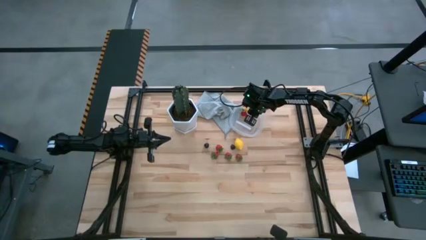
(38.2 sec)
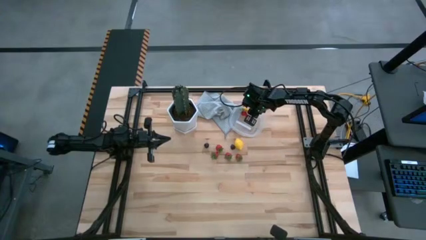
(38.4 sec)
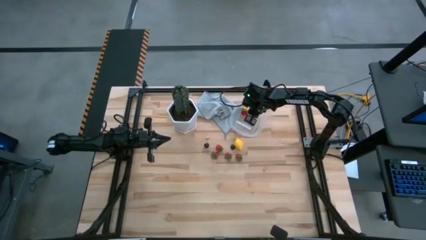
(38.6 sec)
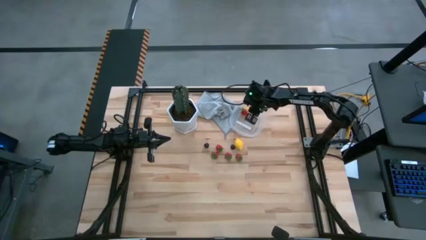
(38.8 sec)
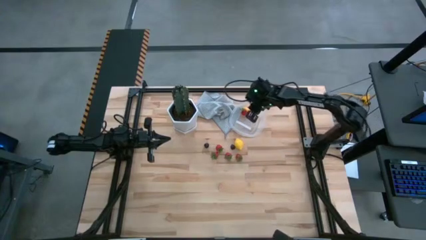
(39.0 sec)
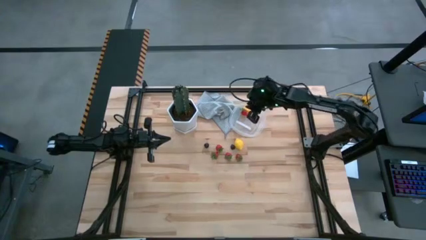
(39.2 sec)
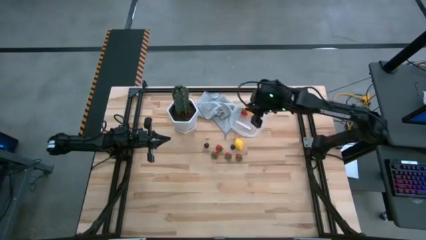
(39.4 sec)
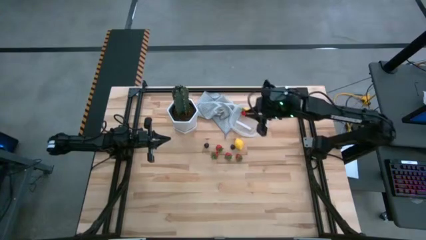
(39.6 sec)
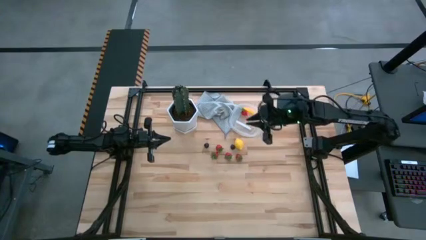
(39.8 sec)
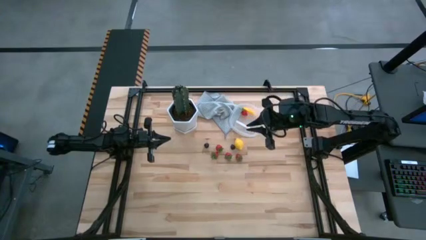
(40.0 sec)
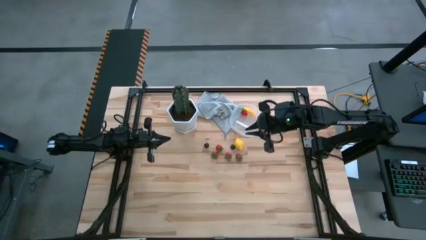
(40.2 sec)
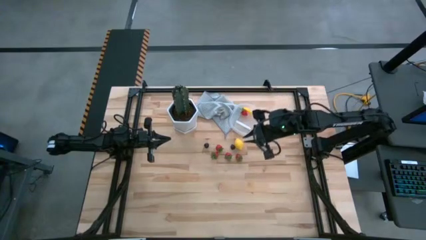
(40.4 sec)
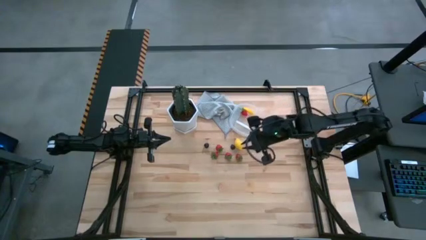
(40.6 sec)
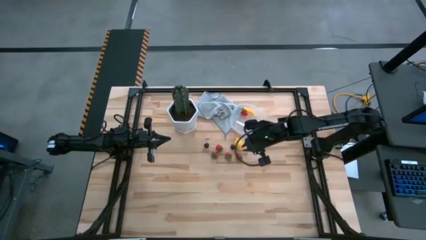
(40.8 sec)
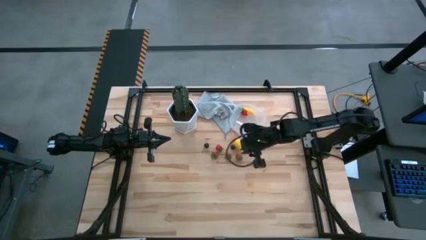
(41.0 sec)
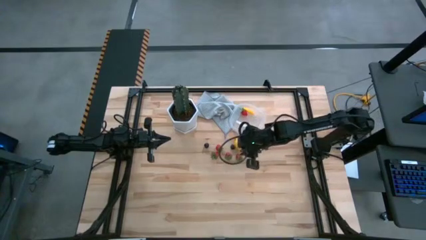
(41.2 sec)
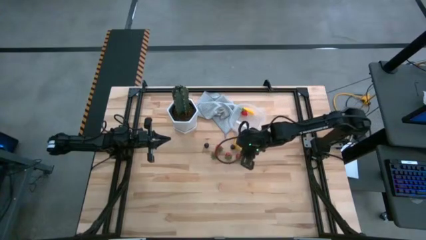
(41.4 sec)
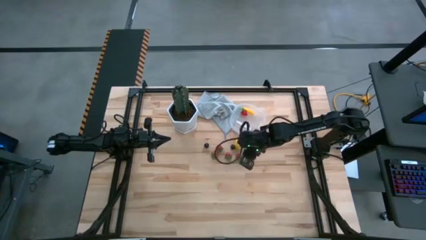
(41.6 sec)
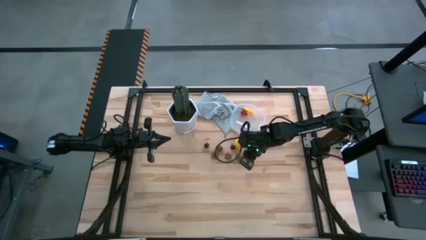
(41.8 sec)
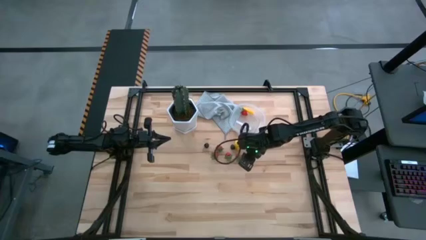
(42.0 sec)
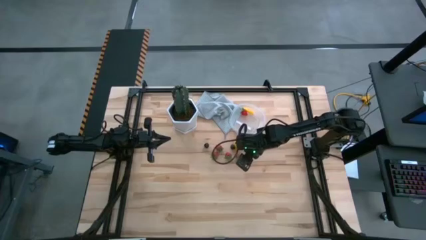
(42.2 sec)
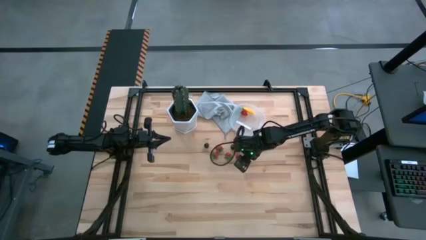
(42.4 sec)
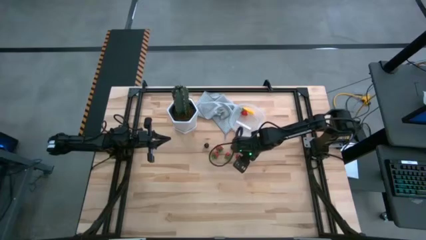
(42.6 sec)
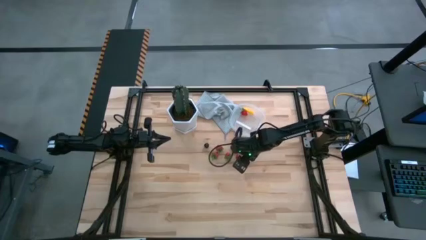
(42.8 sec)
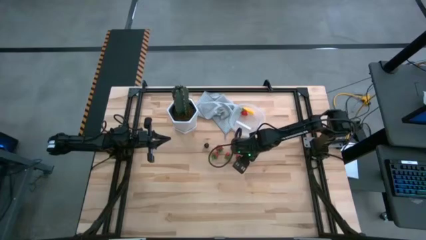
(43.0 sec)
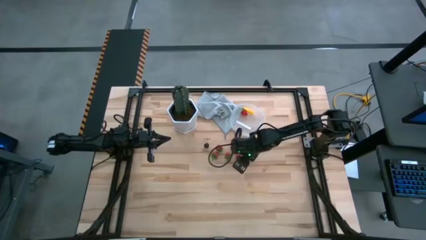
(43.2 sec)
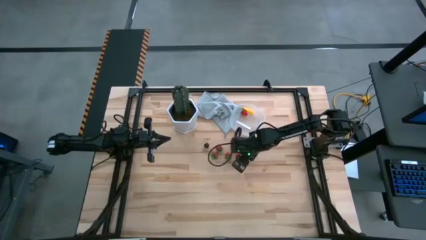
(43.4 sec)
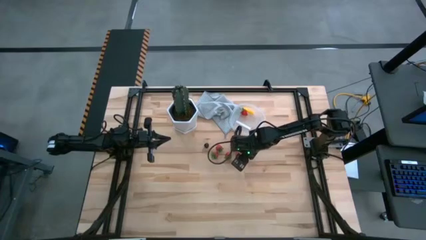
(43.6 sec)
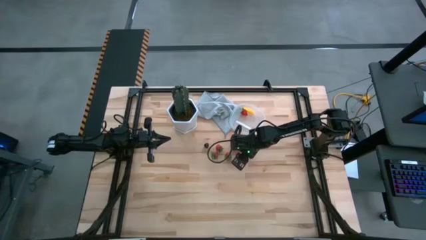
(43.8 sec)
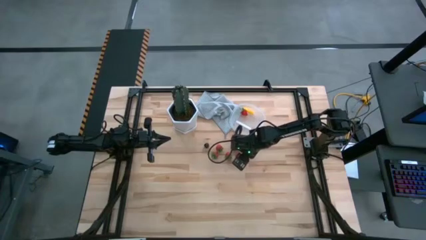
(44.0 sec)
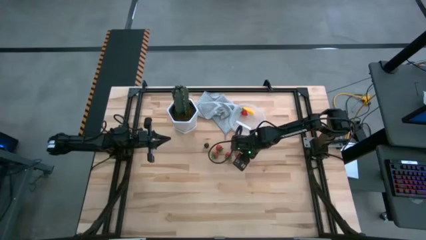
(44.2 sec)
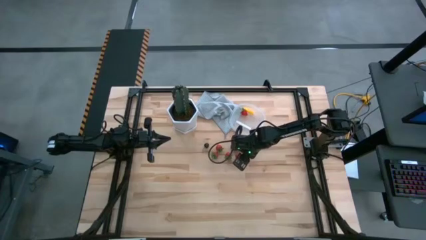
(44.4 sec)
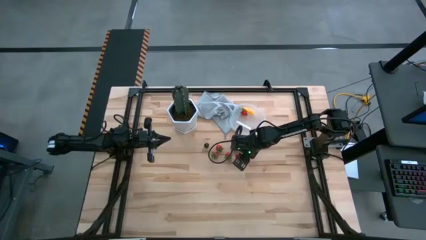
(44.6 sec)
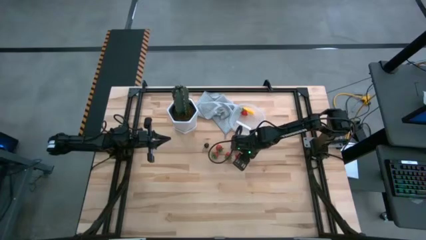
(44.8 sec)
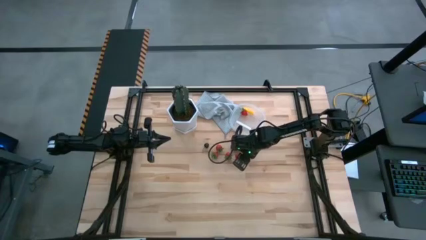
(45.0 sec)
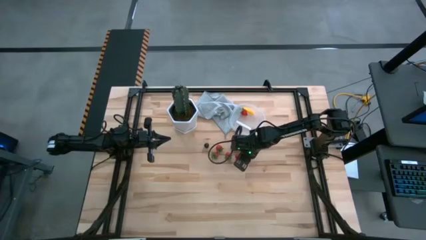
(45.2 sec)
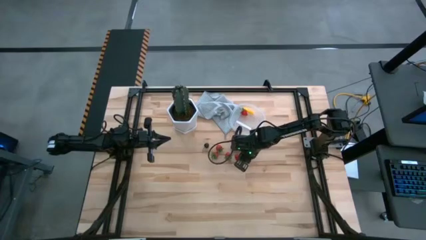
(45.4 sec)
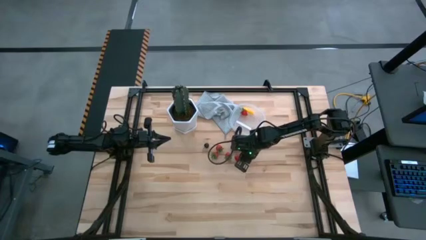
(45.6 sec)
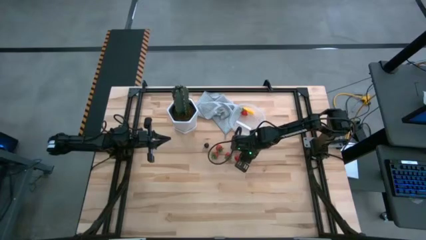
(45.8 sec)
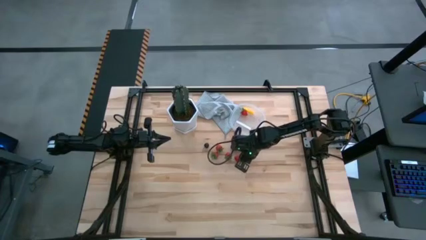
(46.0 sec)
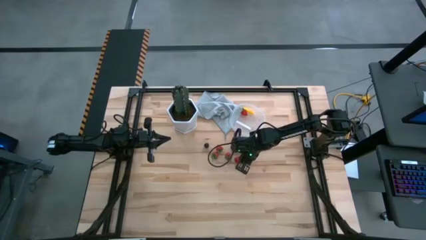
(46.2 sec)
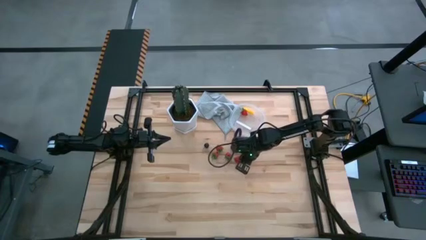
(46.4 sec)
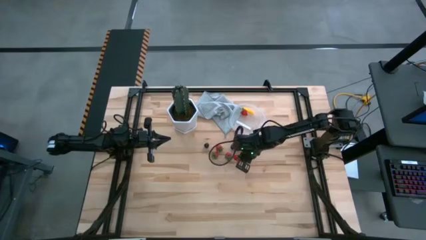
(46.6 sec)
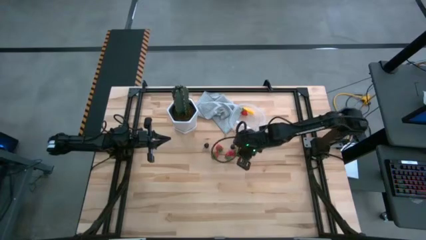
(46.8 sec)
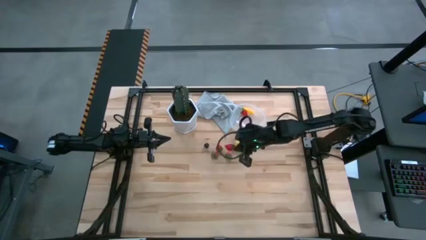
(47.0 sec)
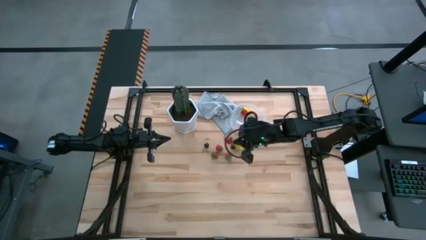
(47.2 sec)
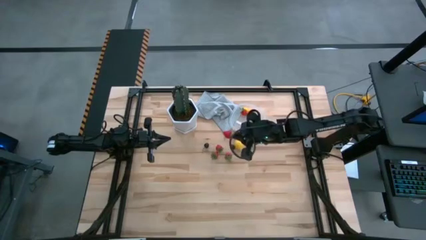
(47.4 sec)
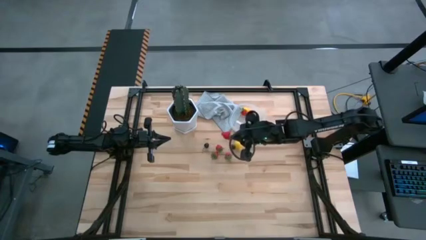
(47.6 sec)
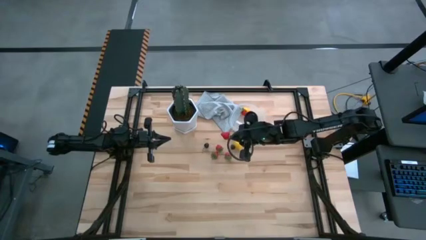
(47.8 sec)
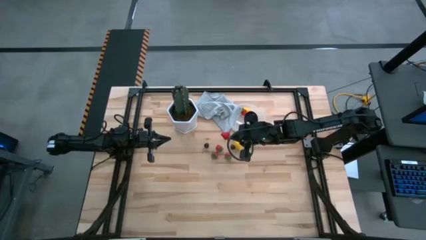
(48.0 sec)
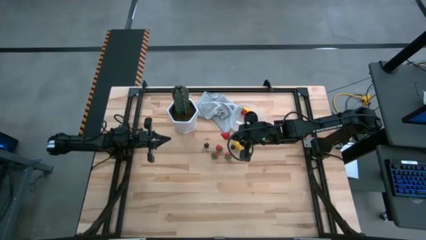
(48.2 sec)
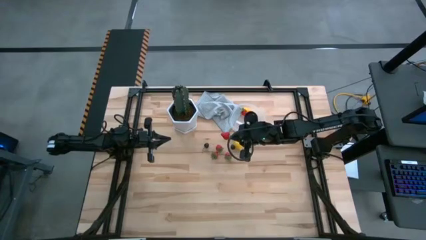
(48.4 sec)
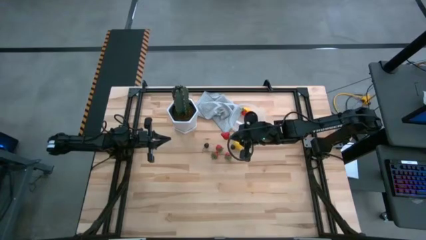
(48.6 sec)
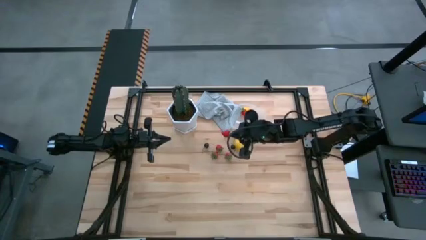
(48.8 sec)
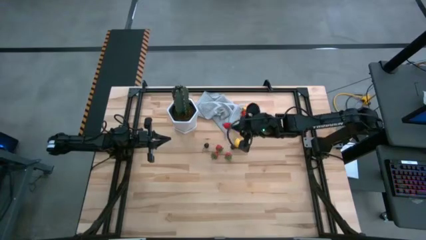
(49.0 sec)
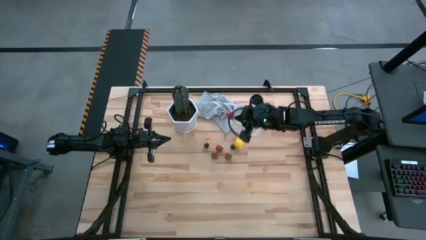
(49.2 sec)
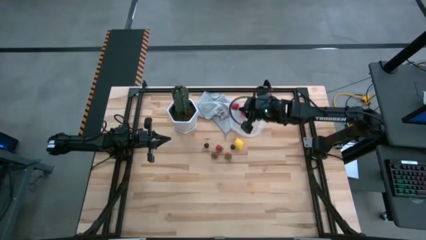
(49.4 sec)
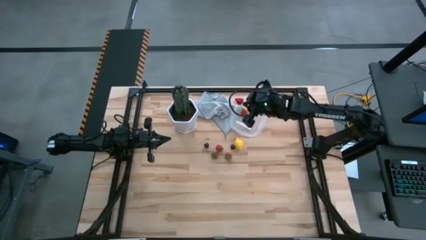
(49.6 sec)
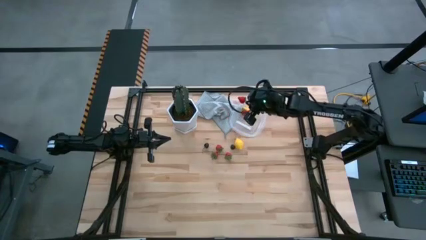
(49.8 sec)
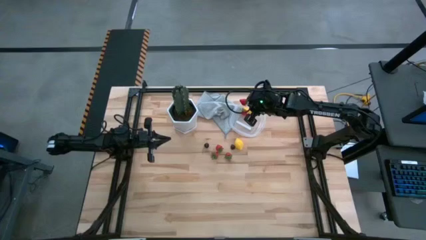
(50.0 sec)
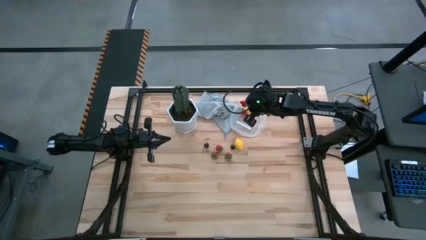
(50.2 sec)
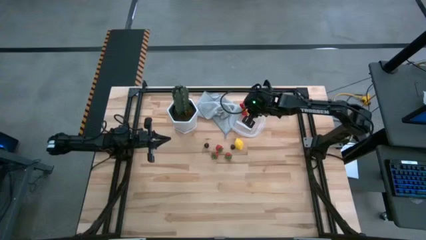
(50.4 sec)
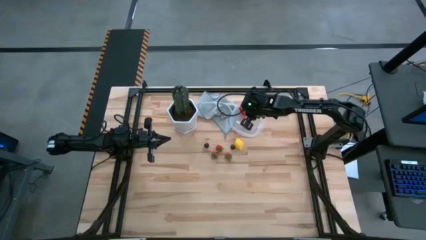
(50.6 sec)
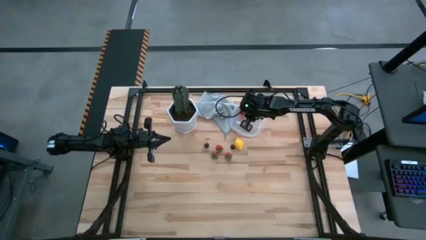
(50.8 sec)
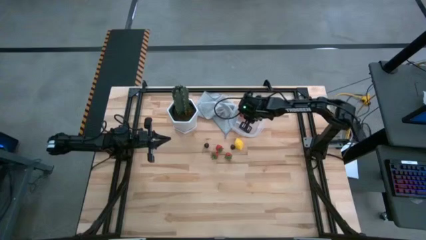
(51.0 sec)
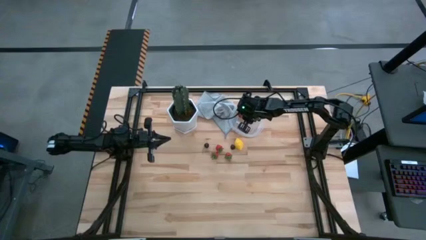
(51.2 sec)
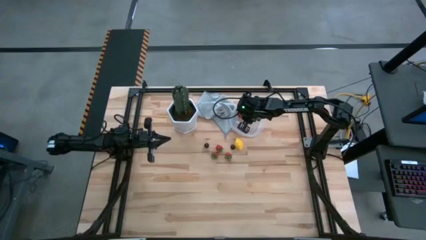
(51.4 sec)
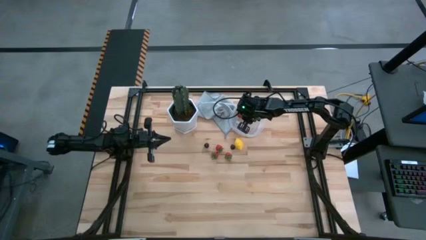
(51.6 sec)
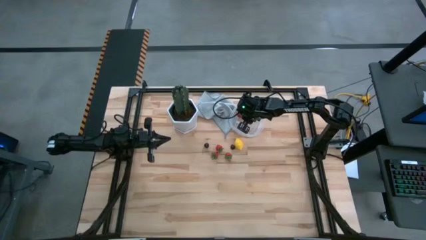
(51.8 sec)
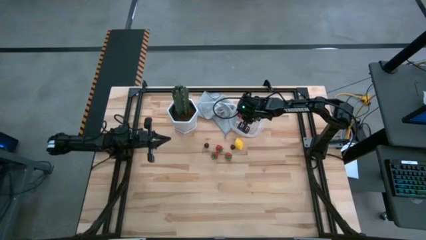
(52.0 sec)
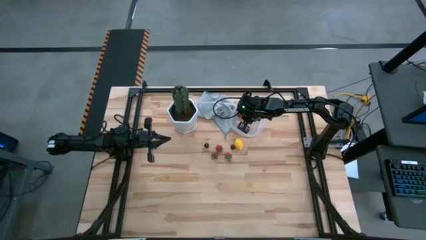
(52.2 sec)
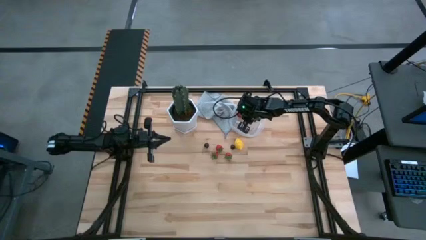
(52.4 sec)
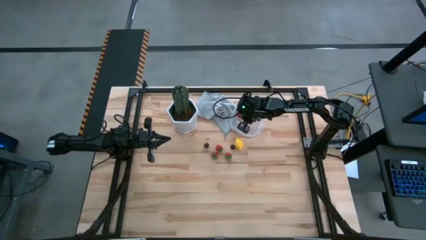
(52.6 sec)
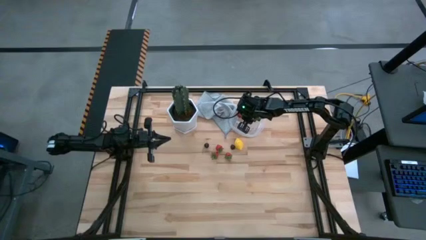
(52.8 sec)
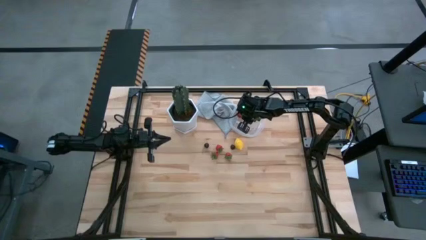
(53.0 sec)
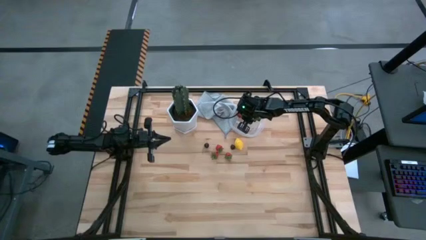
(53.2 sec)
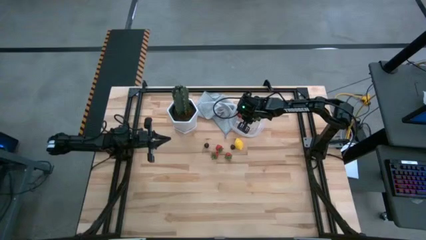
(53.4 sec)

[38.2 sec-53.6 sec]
Task: Pick and placing Produce into tupperware
Put the right strawberry into the transparent bin
